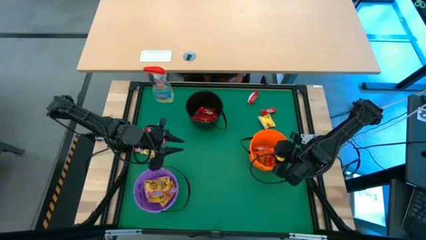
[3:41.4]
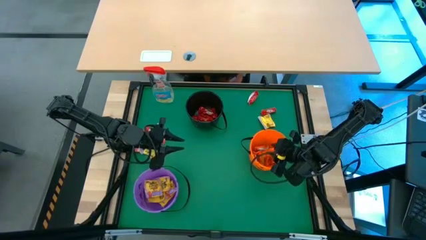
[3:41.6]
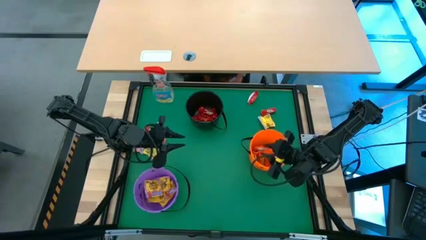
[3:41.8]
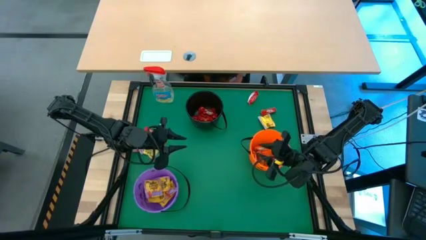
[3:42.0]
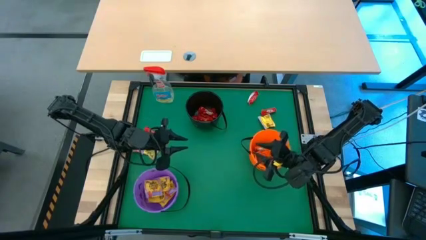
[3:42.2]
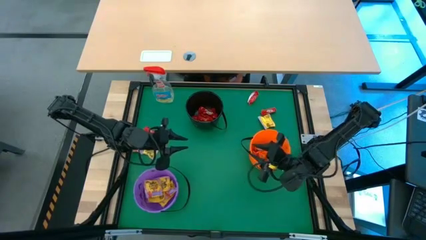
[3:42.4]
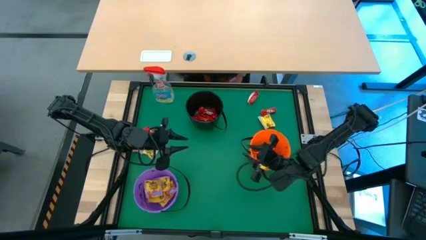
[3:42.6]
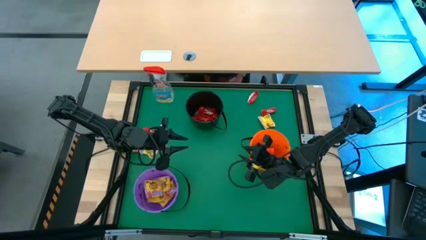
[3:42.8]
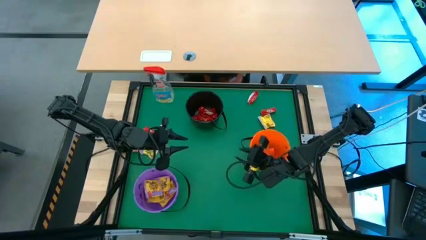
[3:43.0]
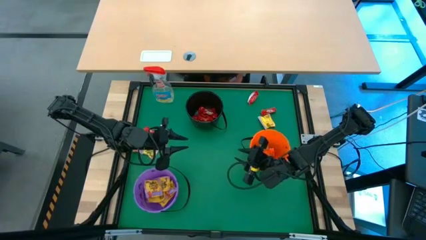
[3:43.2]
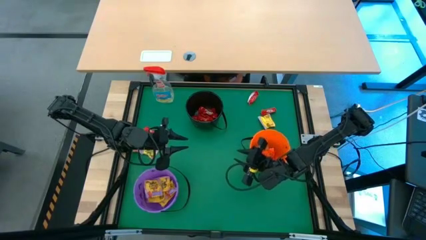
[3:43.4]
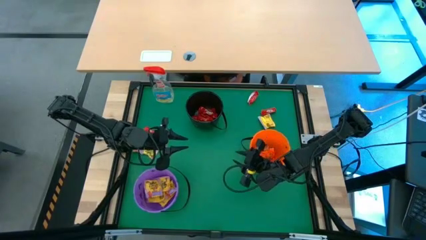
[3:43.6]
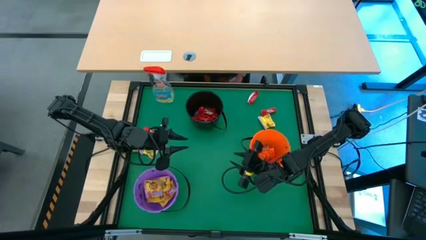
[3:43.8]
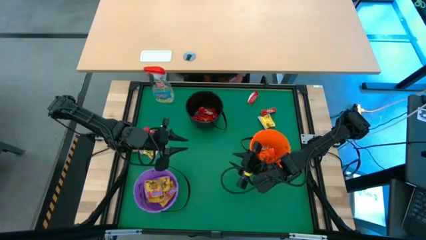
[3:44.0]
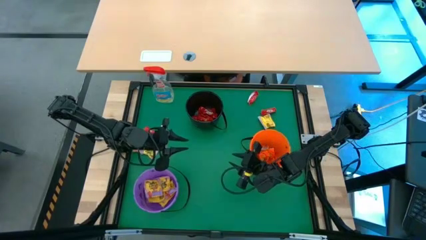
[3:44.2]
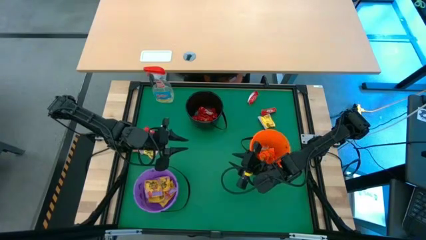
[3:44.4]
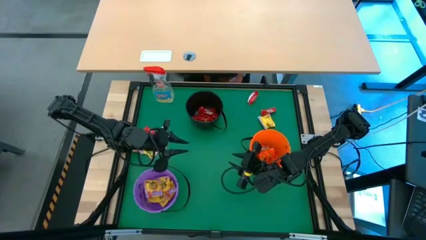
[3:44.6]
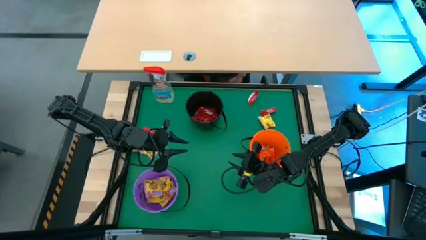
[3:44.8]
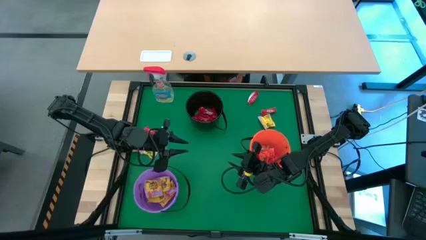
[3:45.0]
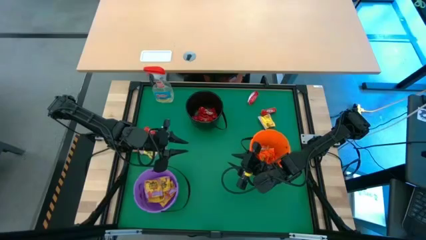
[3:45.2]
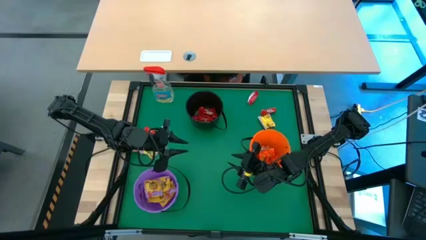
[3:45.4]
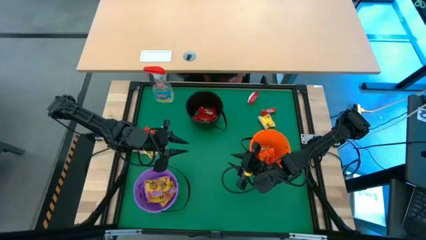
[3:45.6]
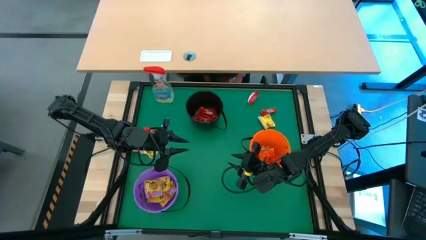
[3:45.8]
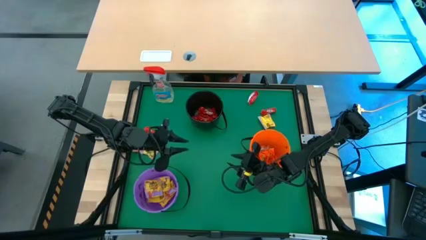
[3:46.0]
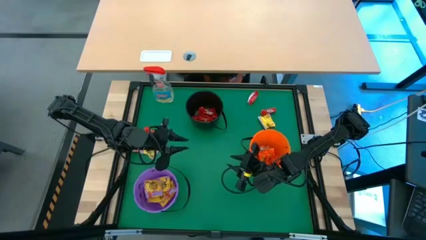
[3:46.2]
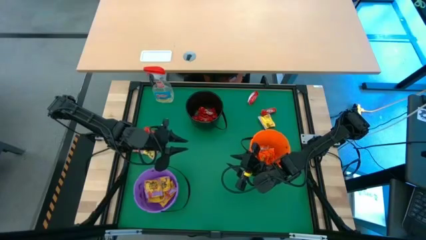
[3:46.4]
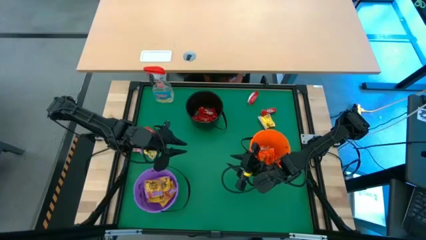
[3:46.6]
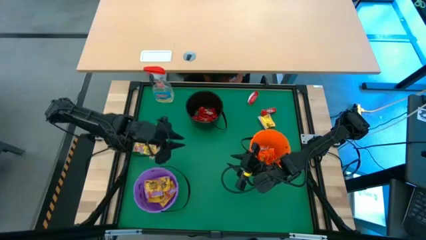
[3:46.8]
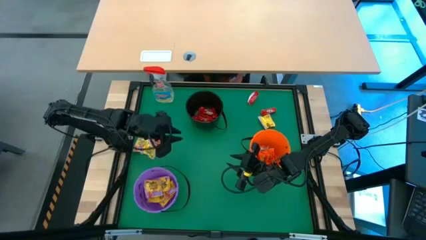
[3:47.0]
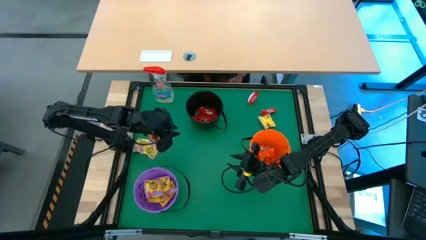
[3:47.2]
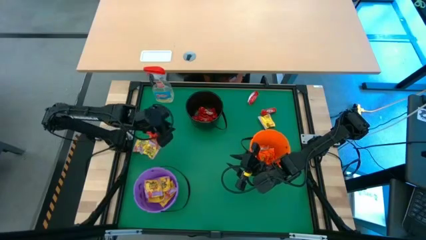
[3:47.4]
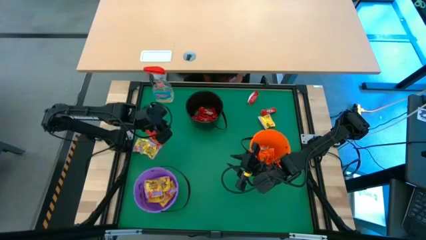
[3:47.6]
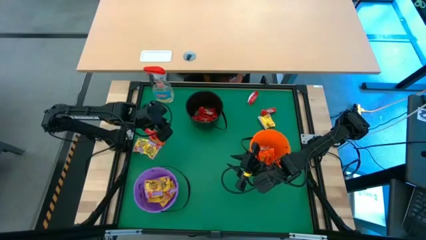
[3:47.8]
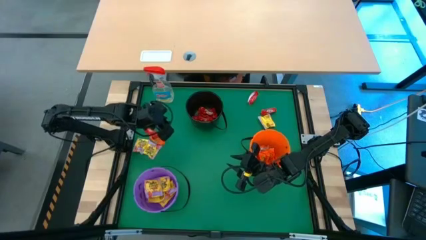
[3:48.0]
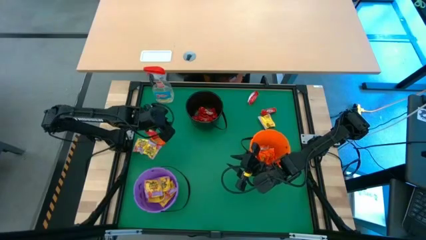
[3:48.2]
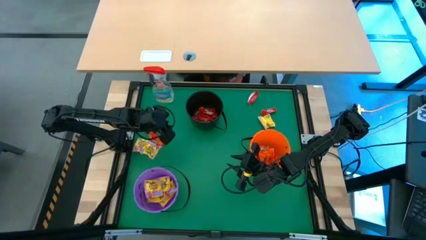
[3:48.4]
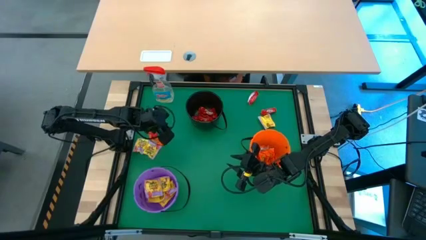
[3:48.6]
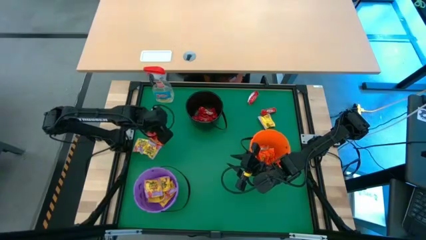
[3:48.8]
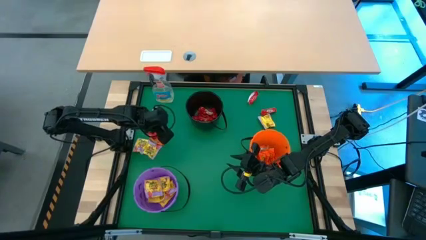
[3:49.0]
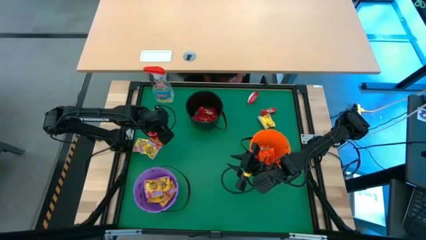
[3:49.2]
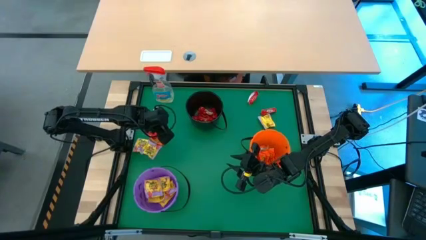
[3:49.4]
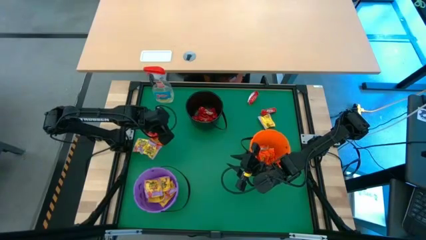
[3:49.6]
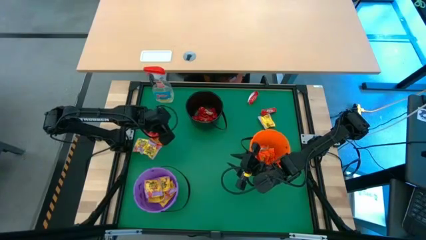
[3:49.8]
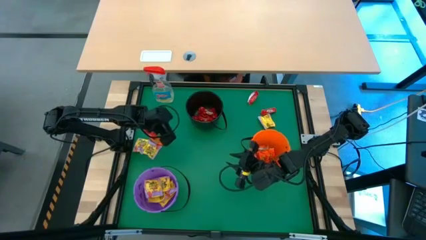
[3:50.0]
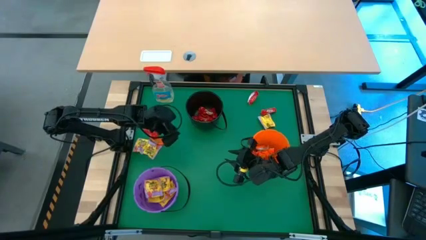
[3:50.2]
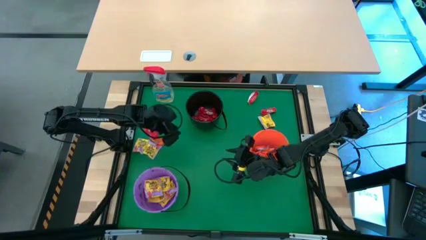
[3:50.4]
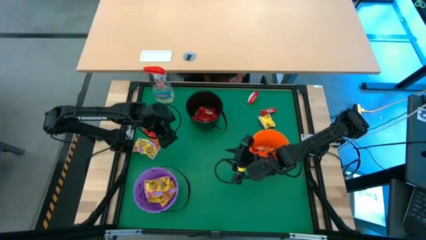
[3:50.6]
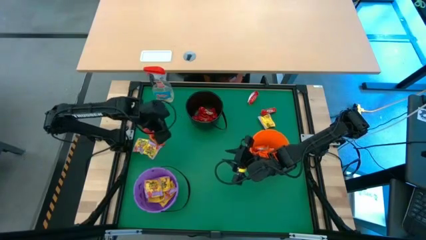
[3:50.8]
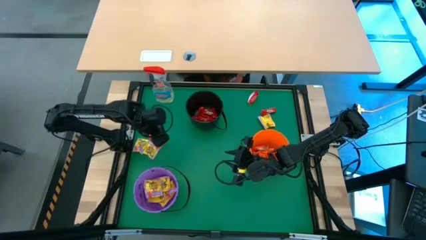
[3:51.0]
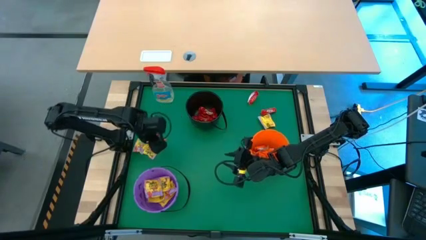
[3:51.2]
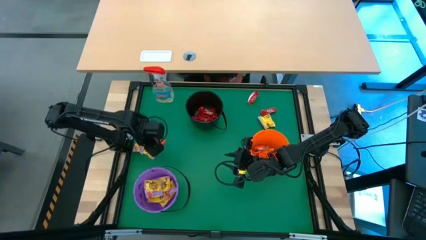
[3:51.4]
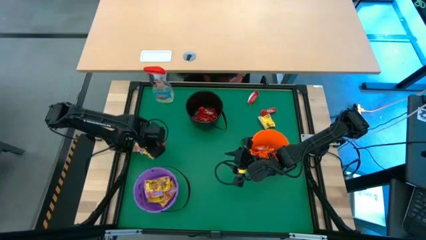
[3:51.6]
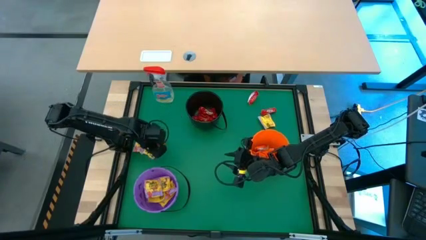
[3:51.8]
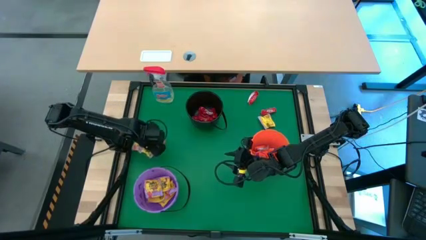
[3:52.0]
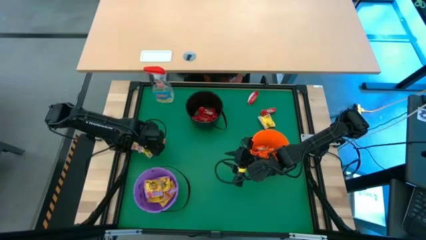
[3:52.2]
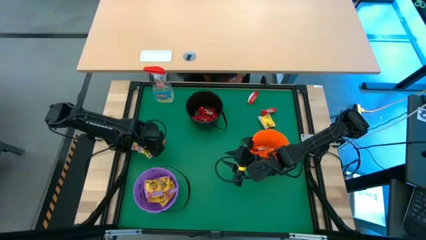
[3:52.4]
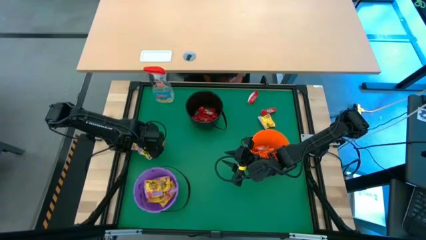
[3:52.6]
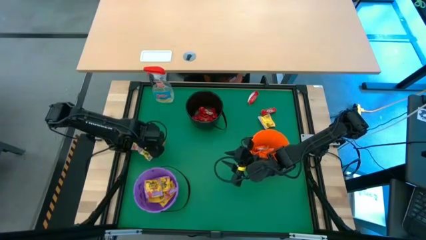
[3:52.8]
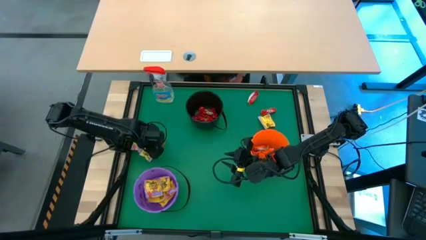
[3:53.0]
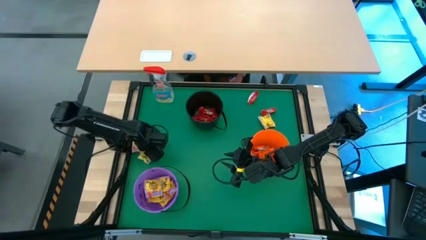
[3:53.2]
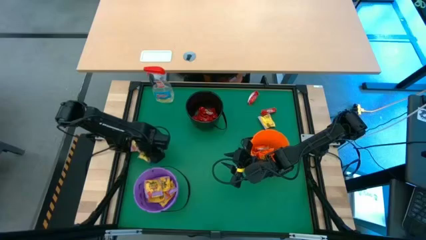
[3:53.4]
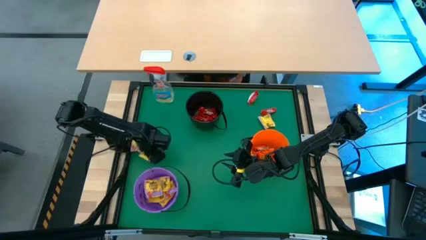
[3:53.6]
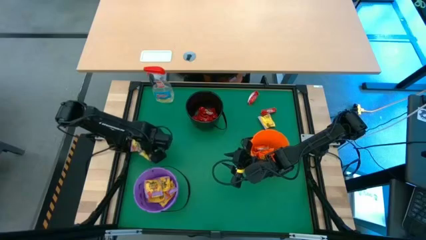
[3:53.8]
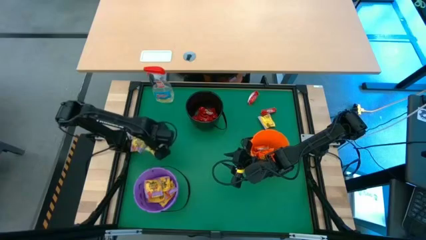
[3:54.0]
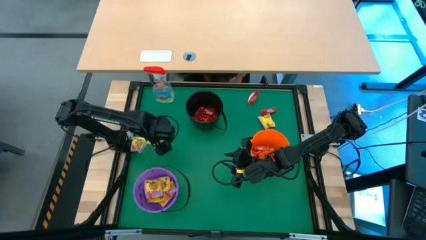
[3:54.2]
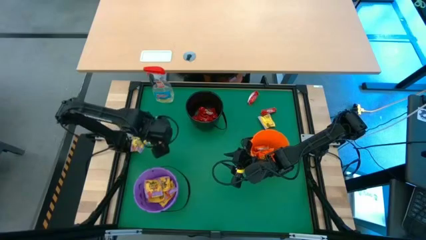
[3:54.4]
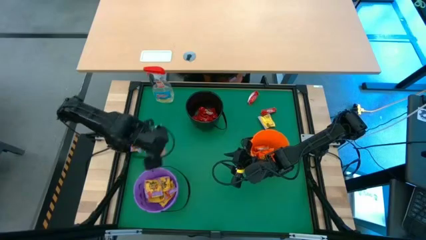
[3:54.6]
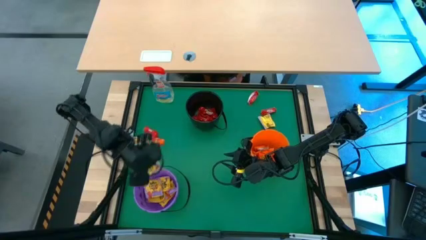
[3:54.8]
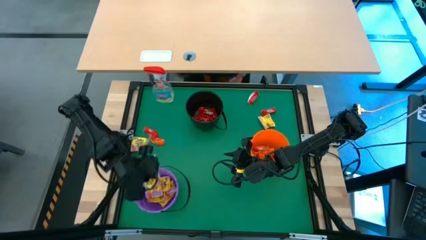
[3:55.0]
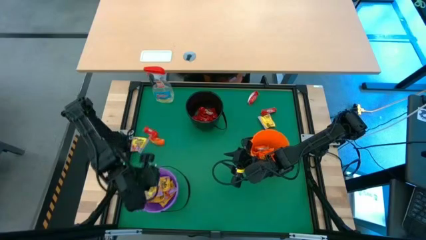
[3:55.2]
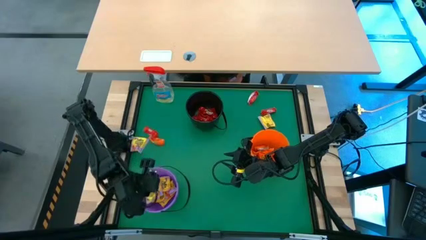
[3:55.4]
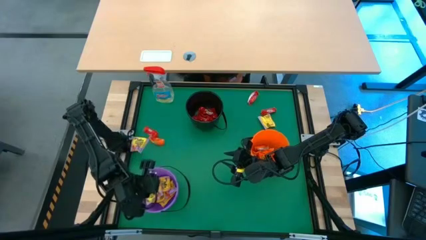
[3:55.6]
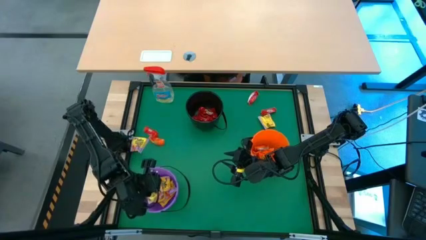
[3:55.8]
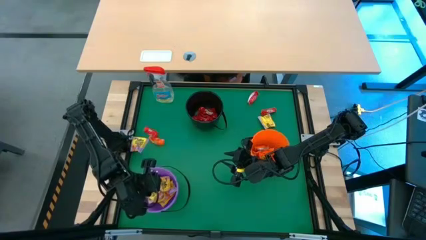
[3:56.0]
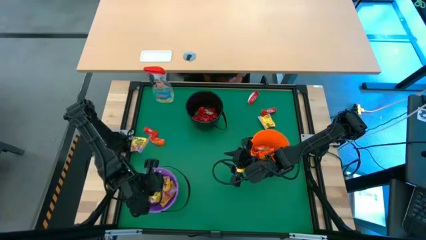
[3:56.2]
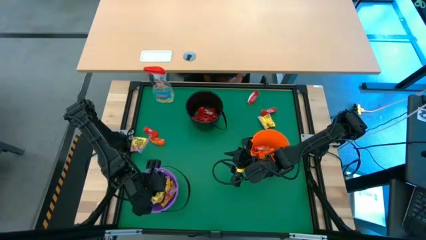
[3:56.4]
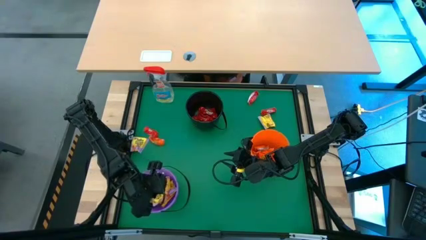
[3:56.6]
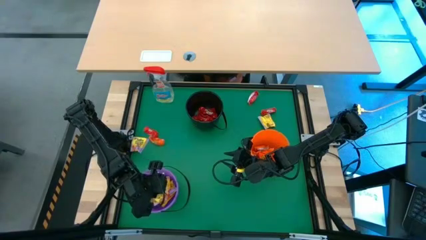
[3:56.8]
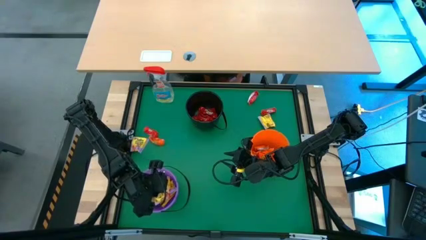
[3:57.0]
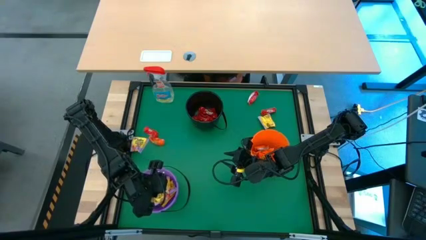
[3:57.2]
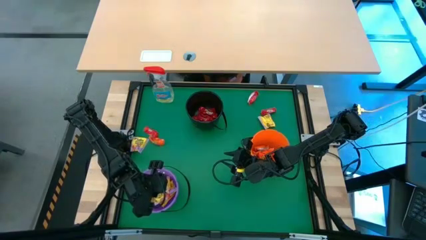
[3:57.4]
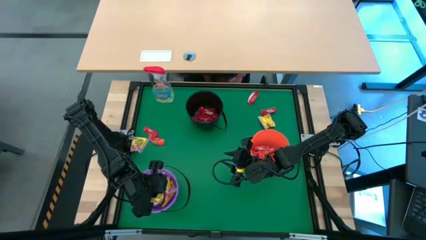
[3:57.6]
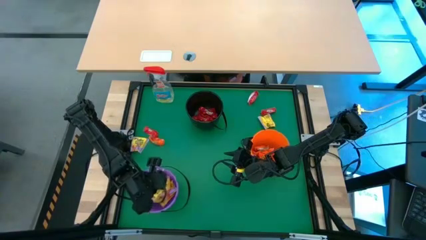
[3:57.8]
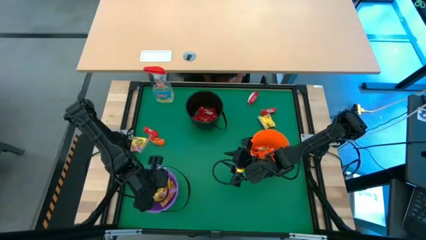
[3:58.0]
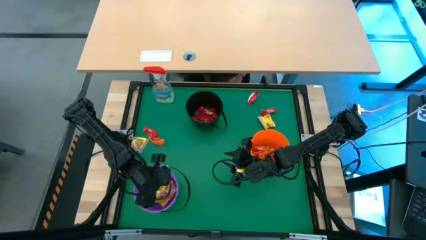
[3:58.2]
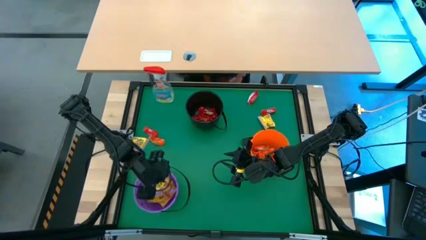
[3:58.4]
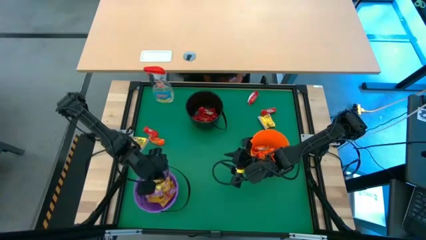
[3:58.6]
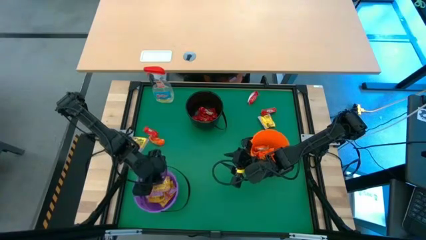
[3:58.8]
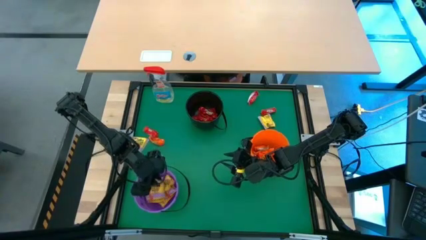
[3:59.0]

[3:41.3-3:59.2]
Task: Sort candy
Put the yellow candy into the violet bucket
